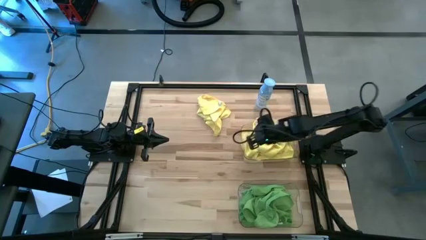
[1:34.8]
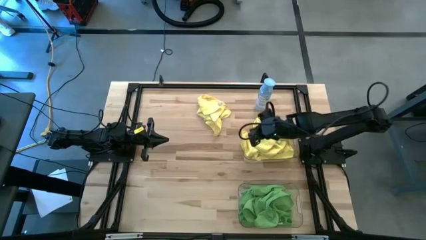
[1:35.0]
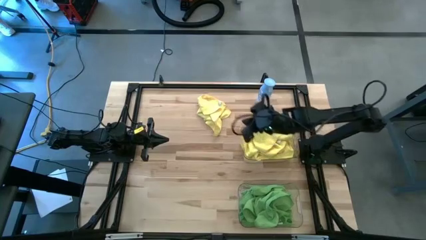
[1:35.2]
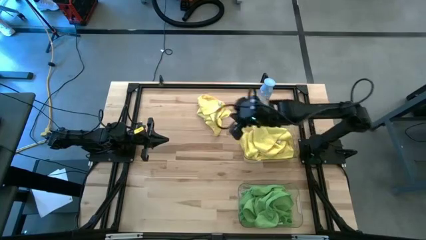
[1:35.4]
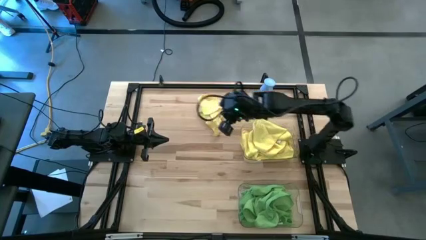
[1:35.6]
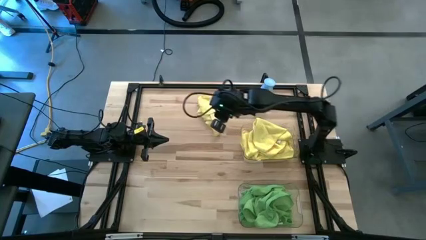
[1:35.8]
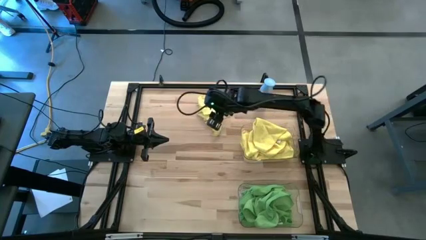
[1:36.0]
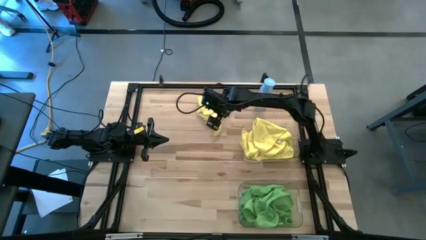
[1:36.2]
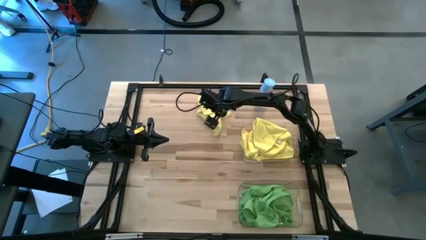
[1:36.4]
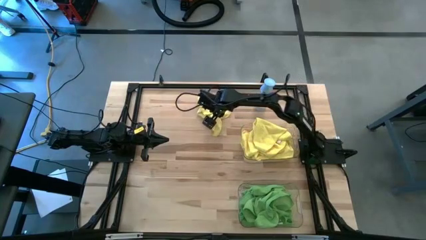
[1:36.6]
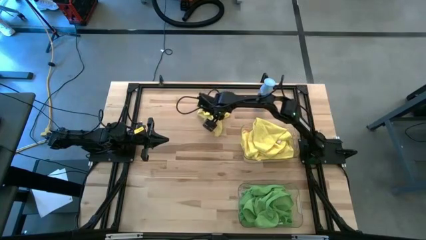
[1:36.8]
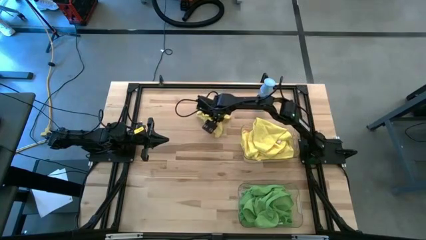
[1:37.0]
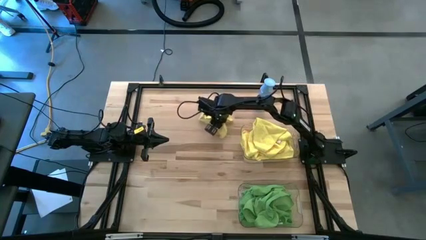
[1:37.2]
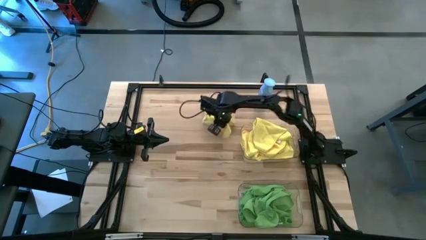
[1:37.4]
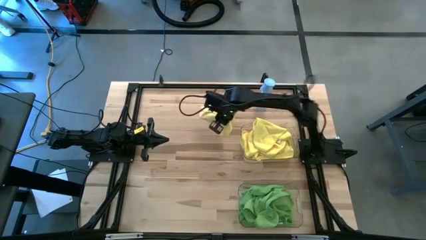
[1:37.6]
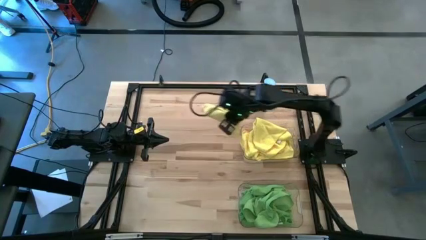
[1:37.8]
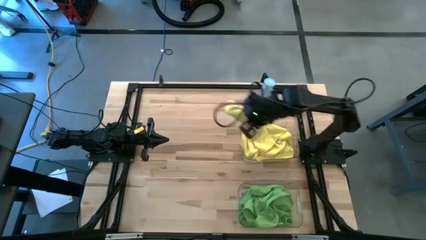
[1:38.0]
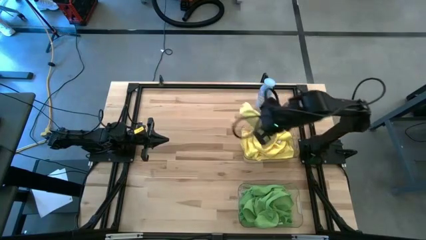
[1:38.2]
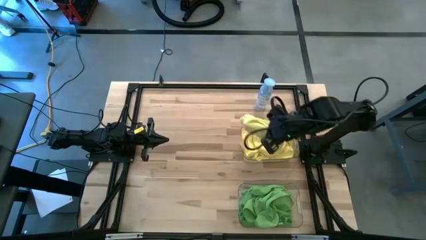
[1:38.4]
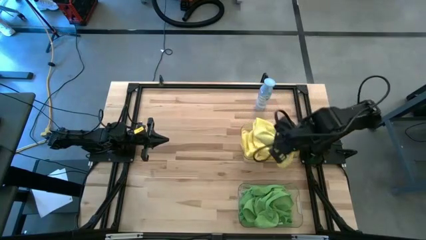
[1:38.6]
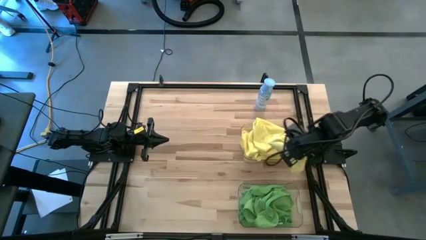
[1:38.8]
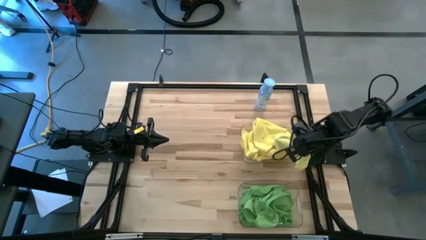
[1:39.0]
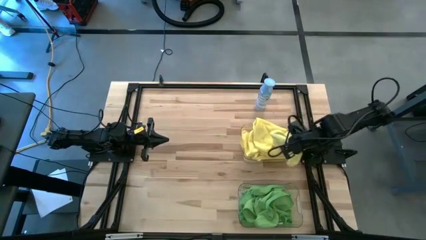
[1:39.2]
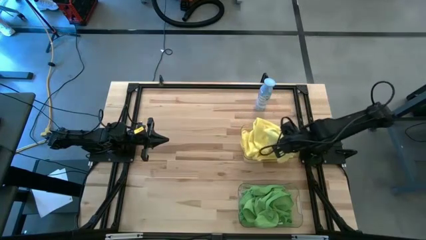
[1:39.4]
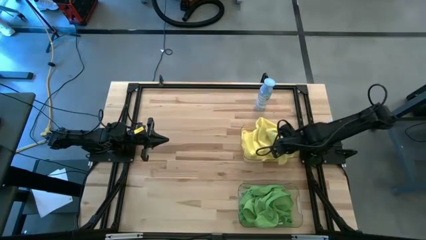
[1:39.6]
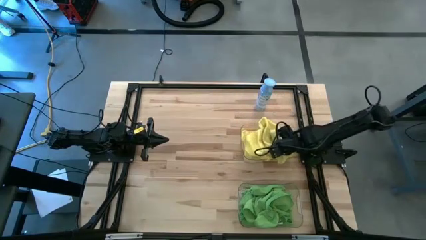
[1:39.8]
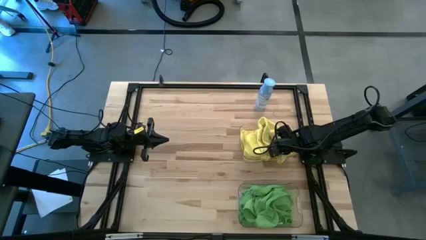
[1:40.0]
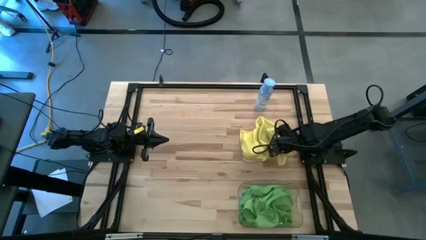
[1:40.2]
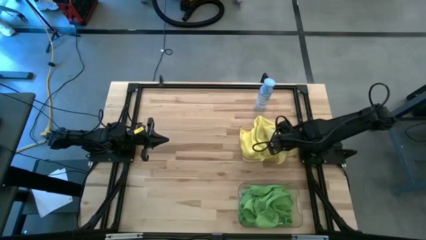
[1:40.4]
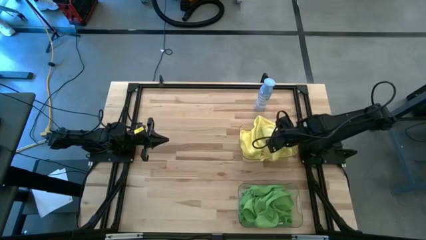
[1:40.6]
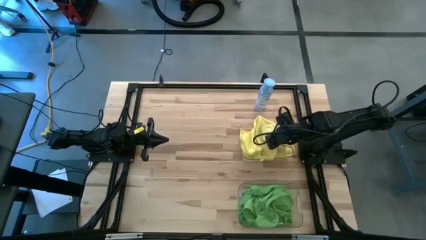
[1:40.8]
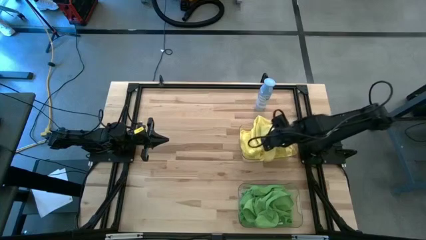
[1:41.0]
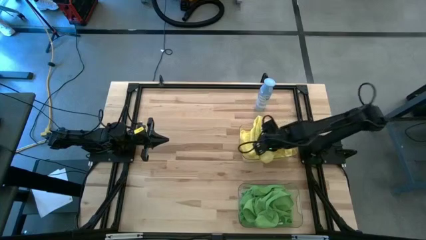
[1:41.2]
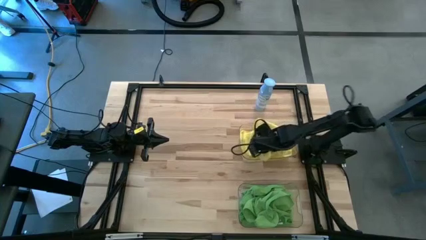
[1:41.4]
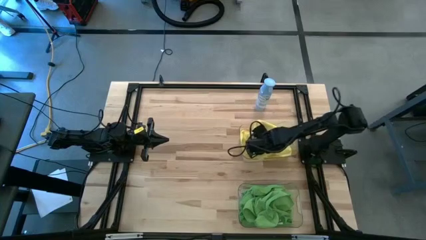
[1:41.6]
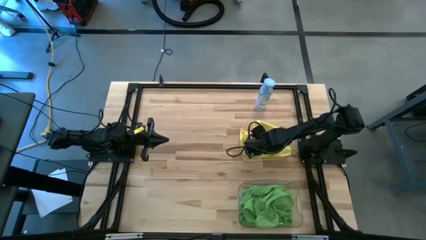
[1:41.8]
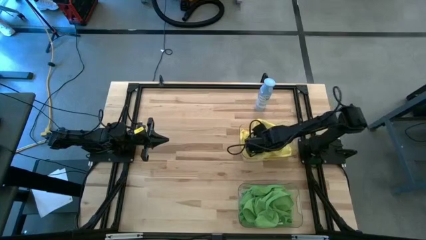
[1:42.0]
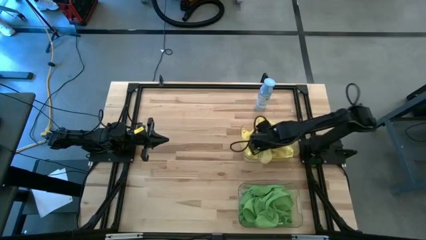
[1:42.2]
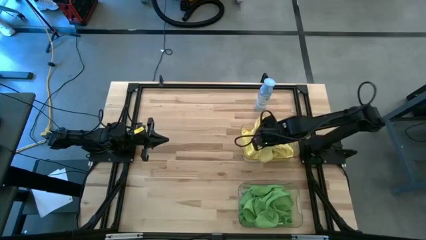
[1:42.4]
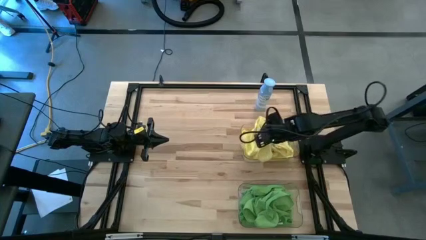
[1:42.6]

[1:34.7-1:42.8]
Task: Sort microfiber towel by color & place in baskets
Put the yellow microfiber towel into the top transparent bin

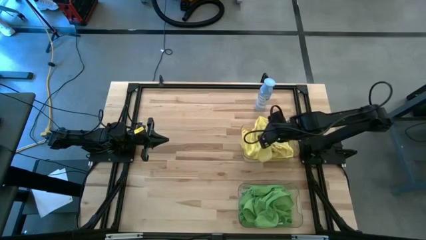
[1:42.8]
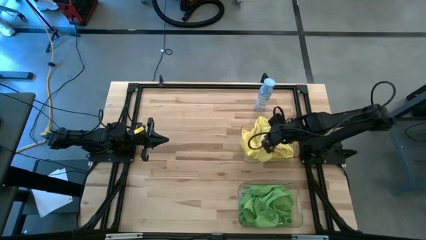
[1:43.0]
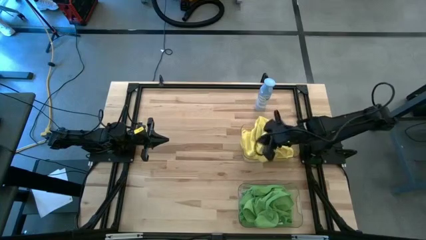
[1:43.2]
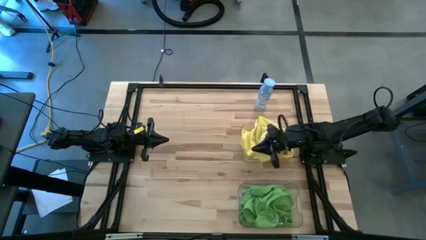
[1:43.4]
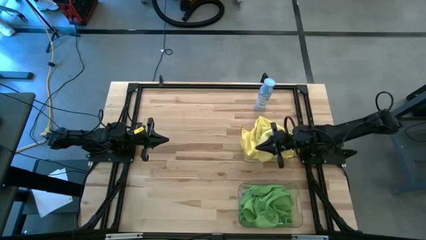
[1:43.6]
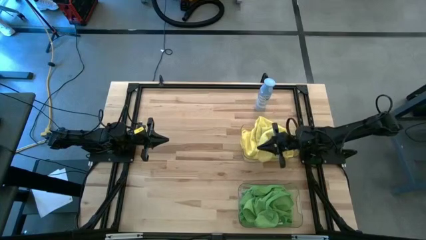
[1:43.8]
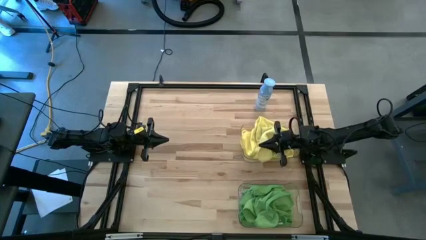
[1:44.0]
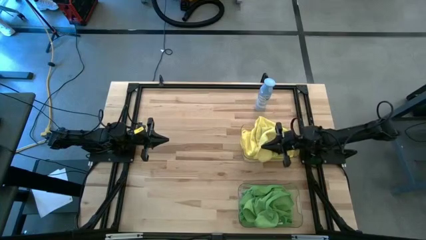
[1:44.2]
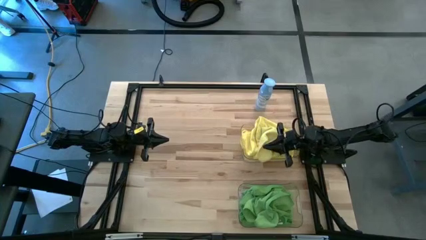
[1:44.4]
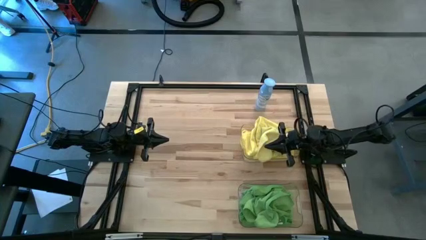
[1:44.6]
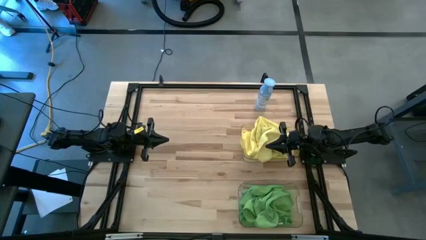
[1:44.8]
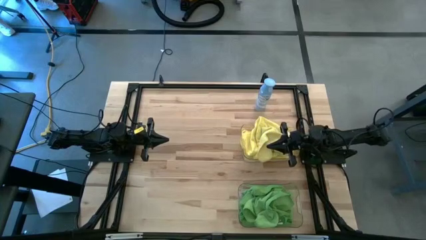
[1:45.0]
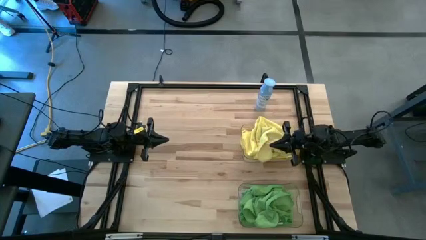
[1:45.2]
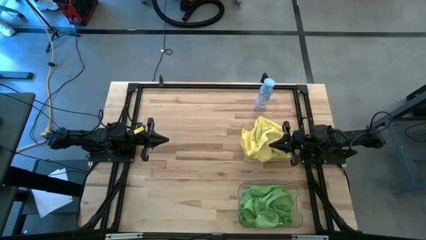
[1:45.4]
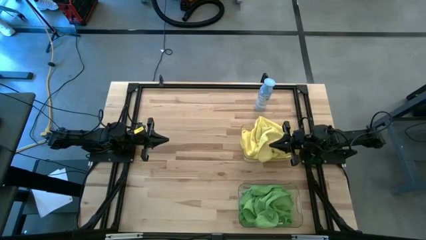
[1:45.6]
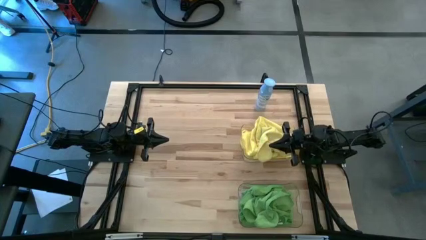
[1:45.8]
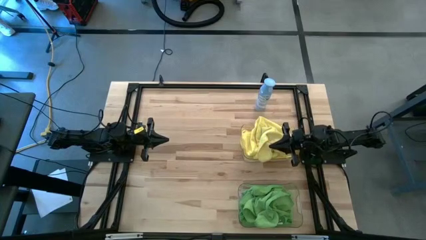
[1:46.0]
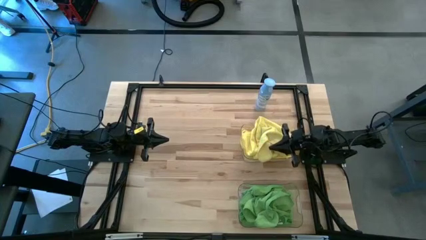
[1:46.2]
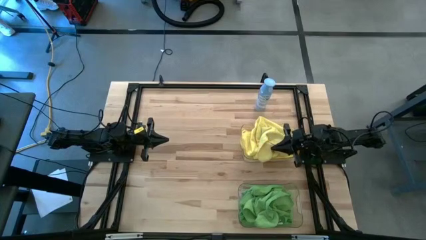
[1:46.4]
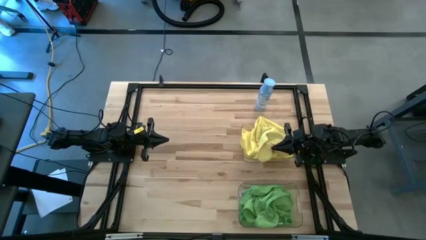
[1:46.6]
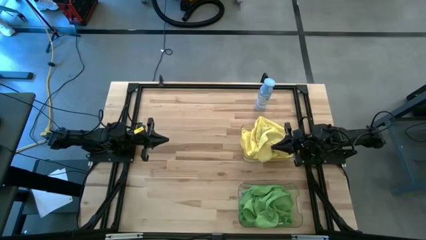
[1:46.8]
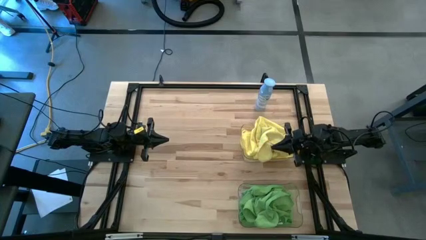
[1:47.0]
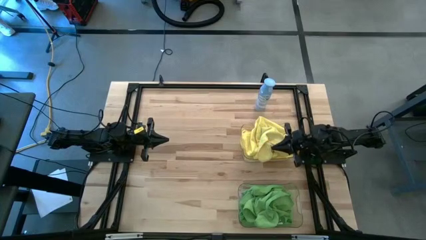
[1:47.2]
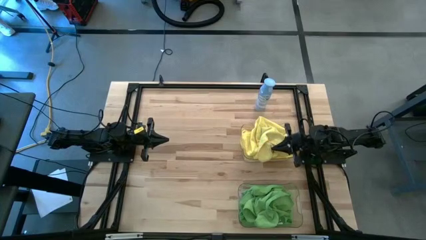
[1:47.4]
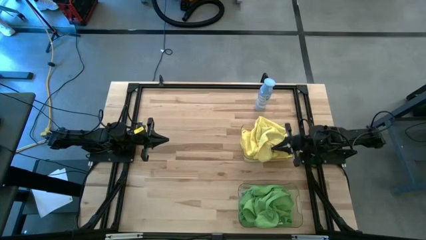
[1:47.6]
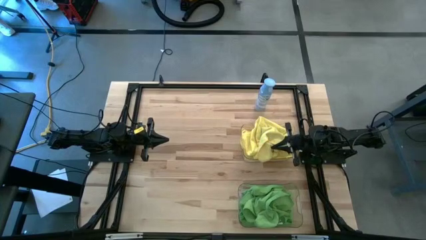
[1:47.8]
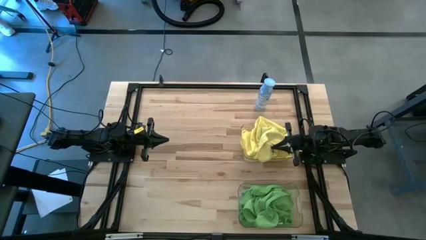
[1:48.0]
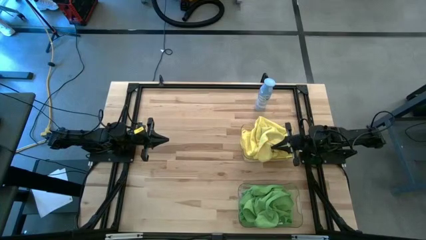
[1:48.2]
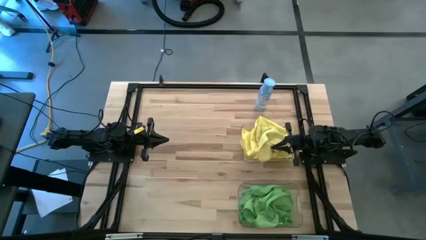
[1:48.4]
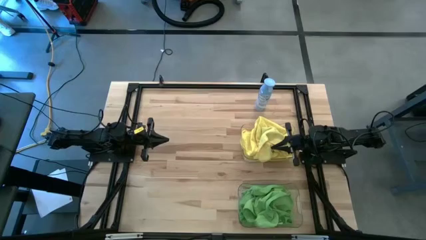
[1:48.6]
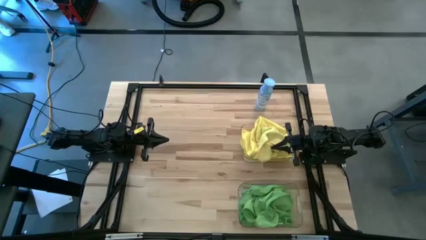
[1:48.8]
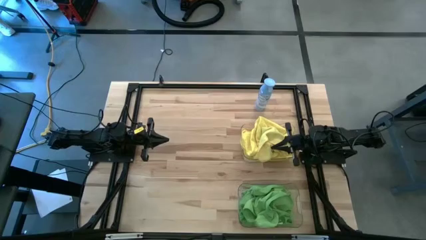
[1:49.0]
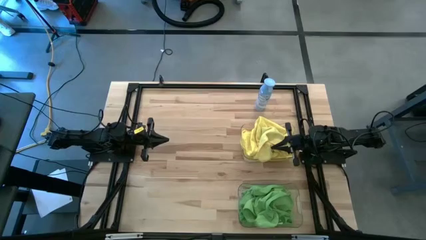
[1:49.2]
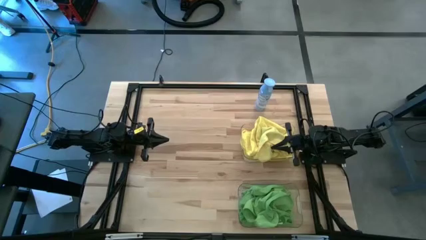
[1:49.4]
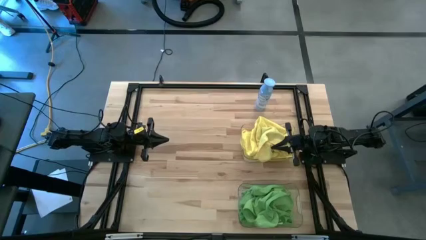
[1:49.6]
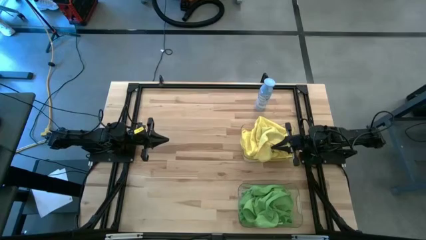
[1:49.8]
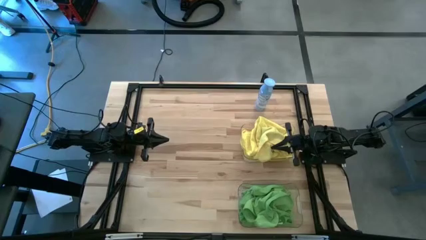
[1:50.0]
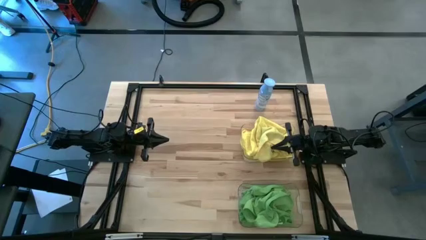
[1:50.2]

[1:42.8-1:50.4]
Return to Home Position
